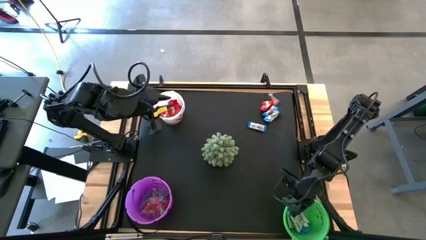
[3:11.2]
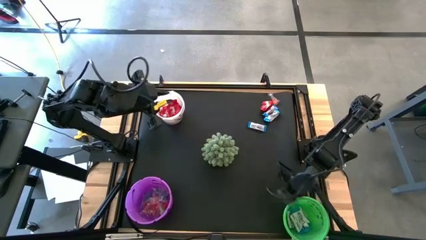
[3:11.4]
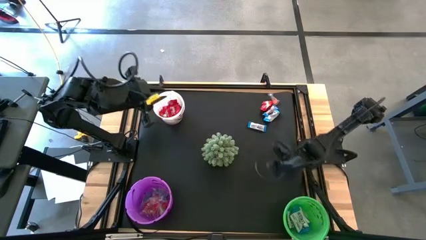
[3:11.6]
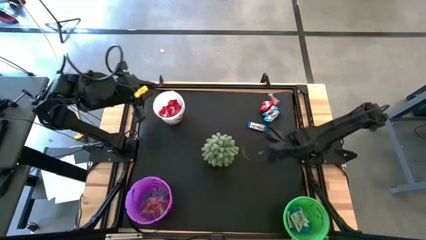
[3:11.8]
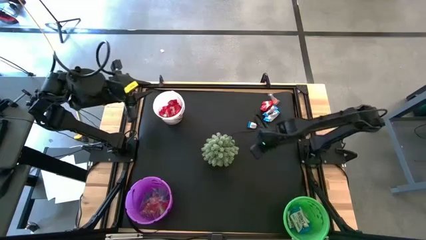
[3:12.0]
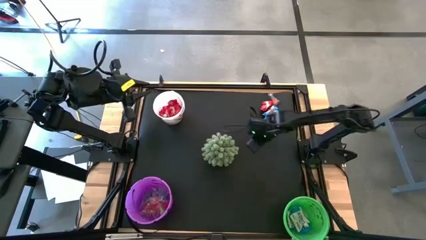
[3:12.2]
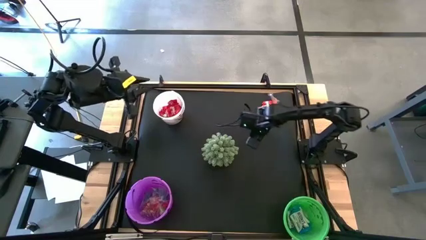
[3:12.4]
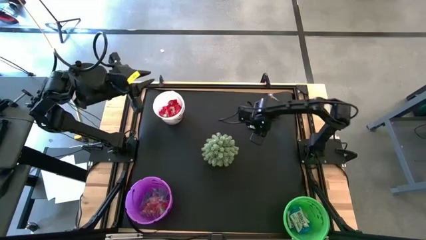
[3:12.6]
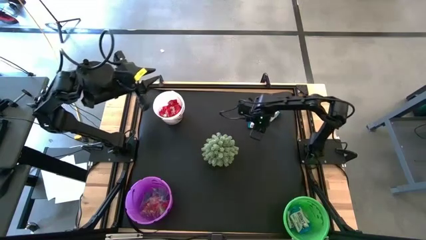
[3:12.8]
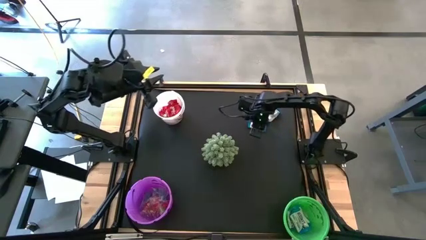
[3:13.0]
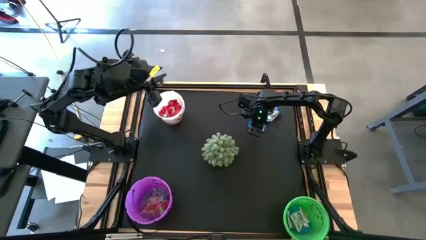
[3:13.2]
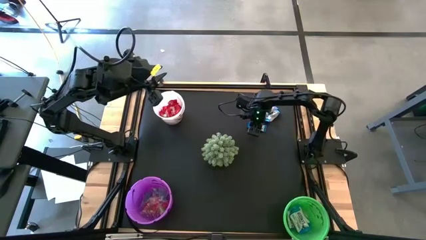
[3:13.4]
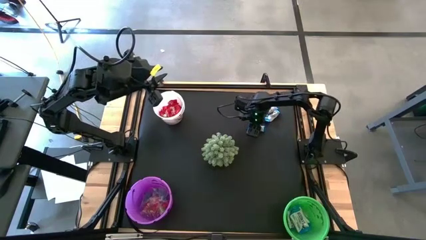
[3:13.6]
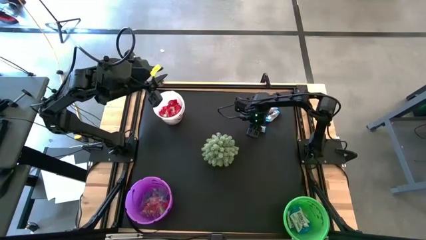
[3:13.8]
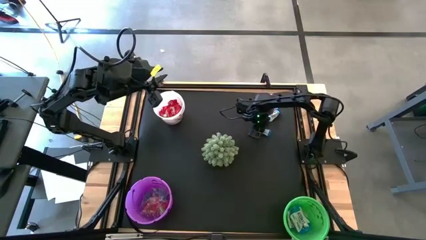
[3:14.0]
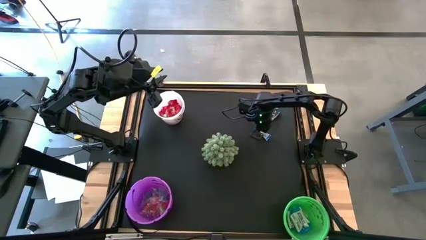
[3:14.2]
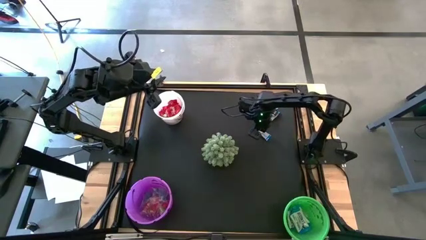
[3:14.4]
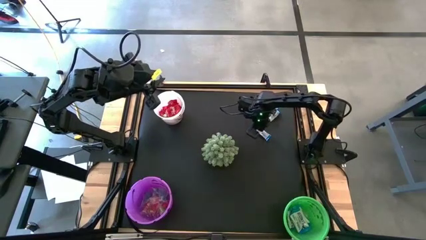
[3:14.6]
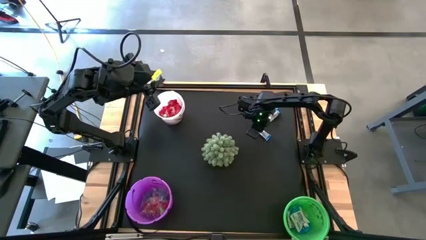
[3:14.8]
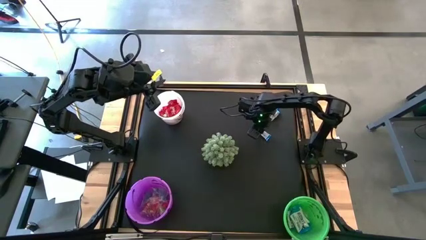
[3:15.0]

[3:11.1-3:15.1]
Task: Organize candy in baskets
Put the white chocolate bar into the green bucket

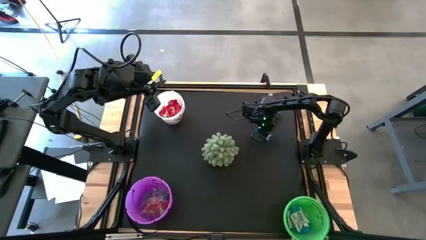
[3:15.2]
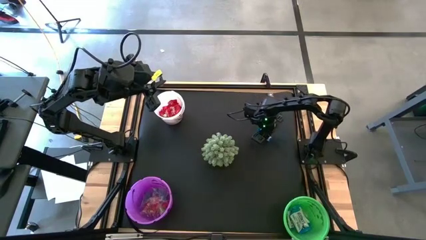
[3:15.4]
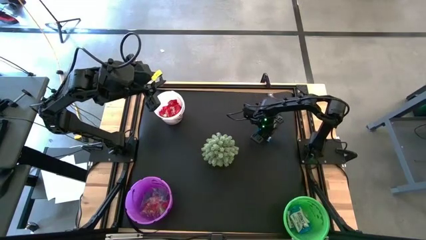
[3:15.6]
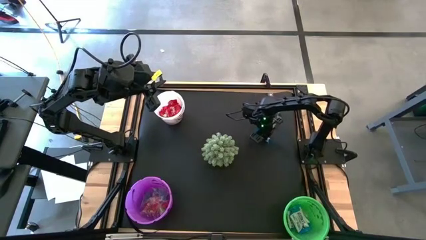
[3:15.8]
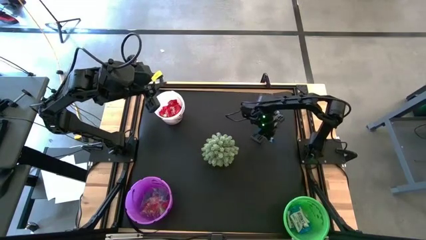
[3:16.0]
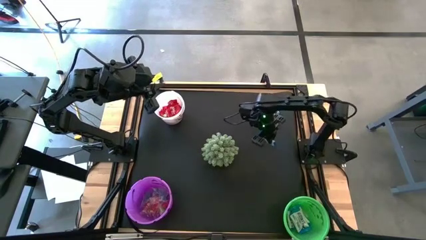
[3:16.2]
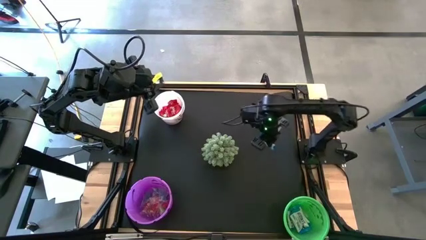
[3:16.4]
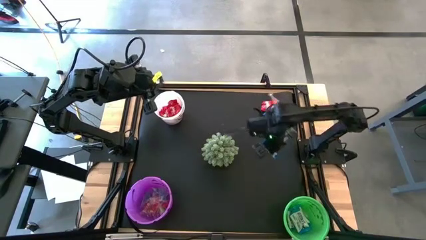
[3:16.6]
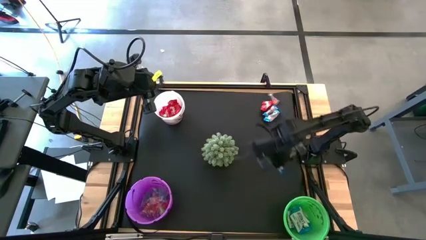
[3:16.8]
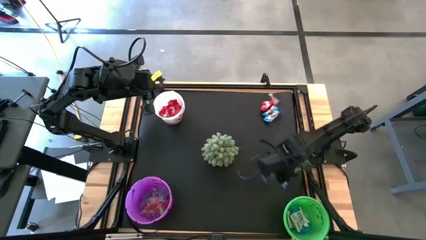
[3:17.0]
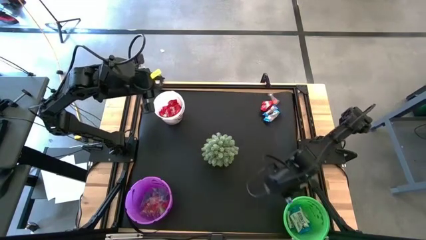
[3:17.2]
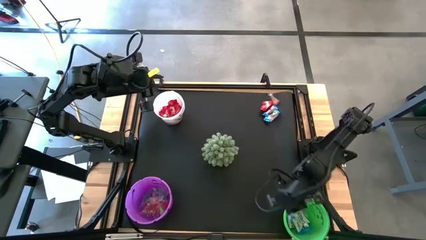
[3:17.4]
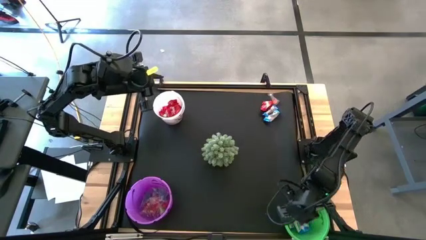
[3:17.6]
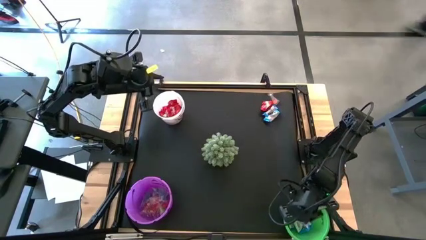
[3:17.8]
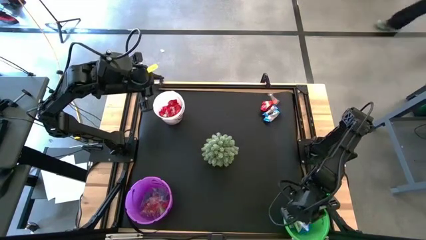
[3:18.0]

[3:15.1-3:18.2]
Put the white chocolate bar into the green bucket

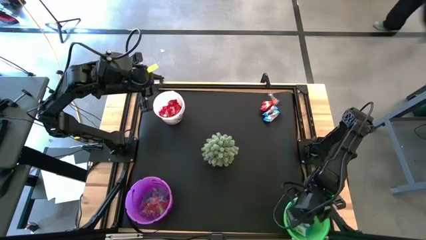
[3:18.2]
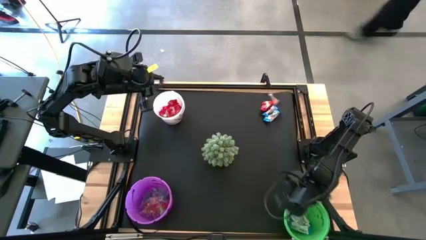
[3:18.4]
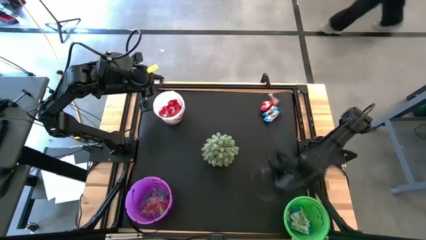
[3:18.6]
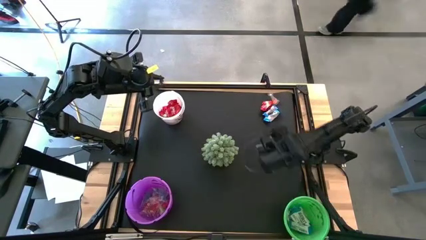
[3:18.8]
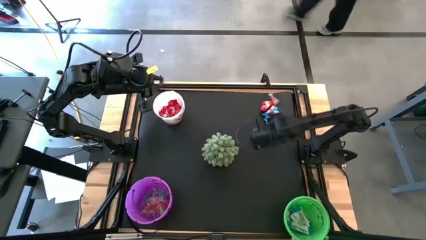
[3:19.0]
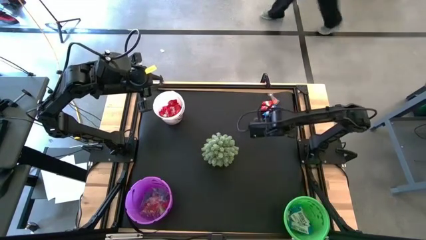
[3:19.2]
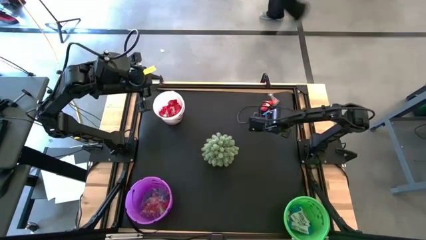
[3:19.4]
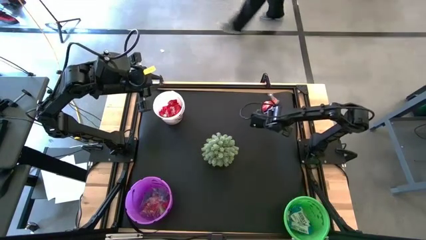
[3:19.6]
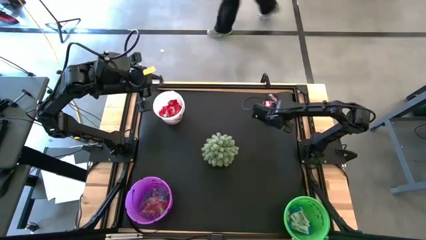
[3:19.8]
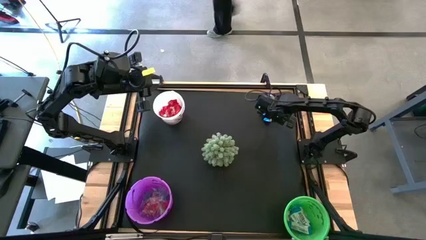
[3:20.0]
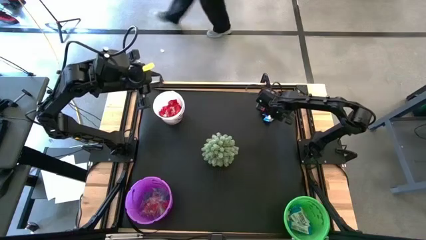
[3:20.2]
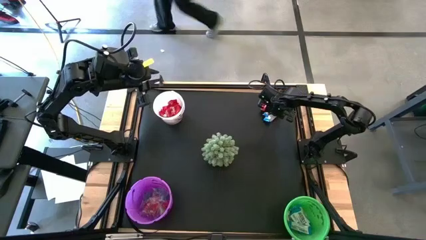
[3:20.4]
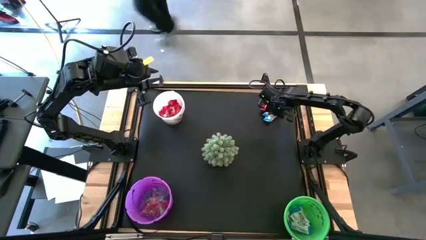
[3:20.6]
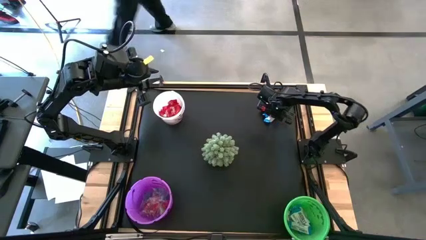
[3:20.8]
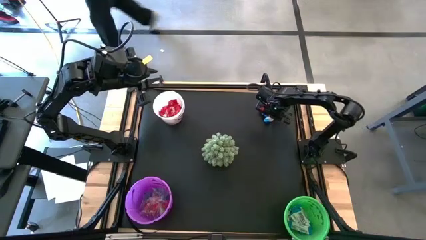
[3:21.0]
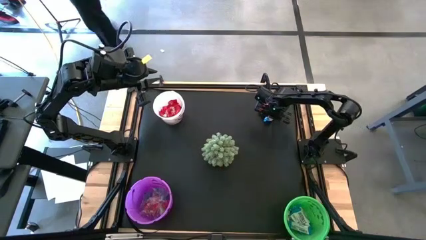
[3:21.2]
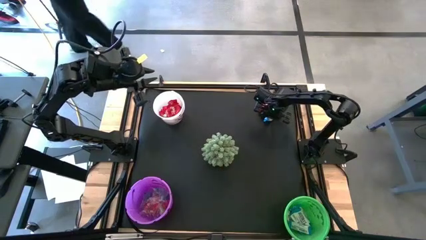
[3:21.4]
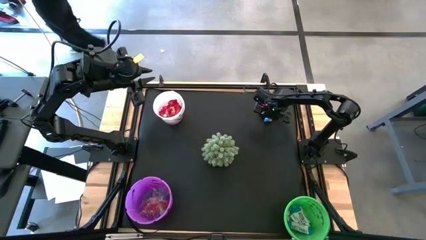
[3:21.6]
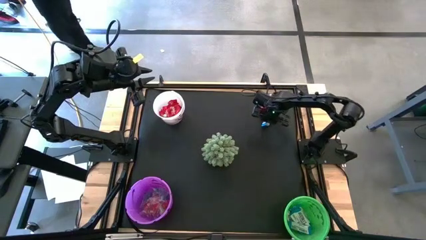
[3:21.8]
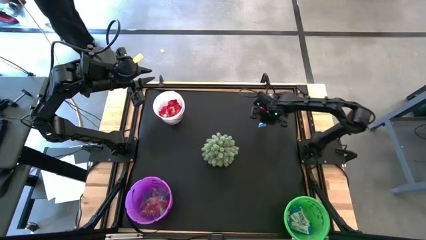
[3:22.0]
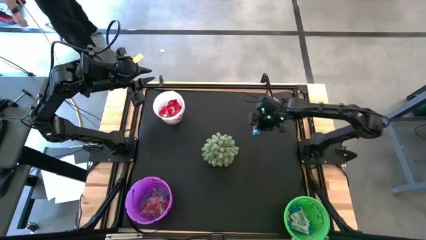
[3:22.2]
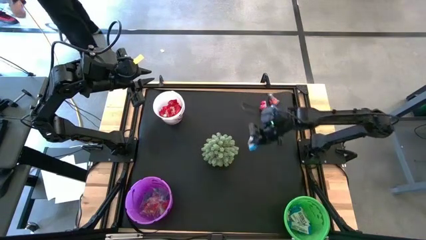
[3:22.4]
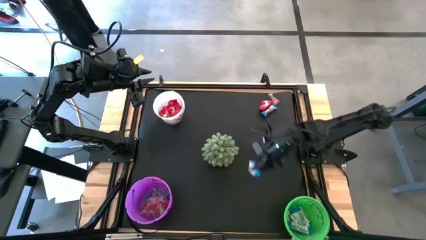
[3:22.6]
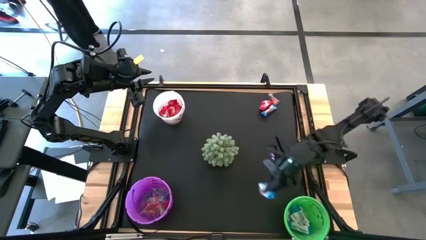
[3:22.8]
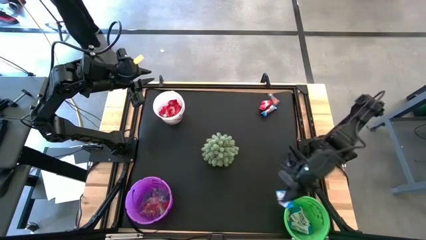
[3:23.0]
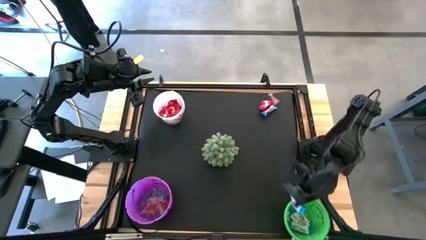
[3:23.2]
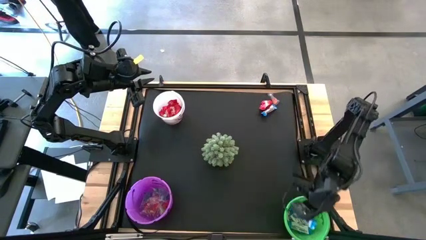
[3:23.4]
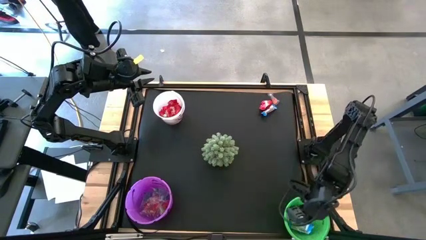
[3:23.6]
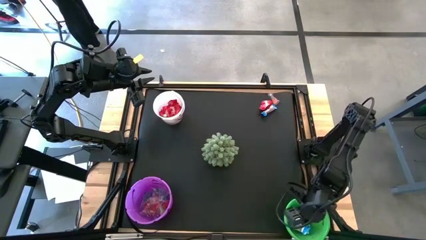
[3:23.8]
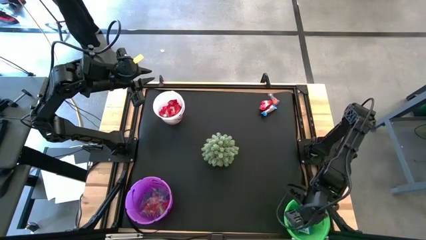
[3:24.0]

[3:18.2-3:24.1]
Put the white chocolate bar into the green bucket

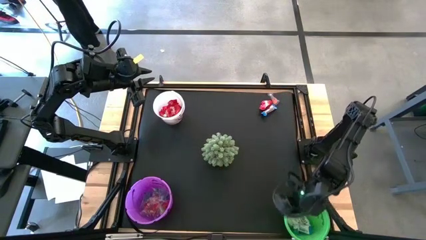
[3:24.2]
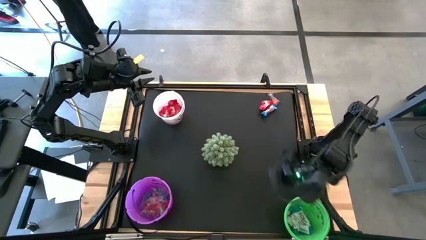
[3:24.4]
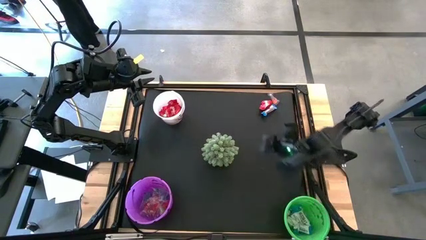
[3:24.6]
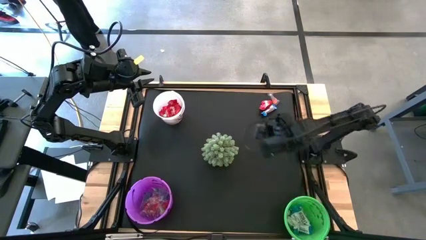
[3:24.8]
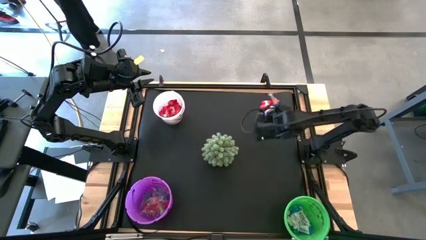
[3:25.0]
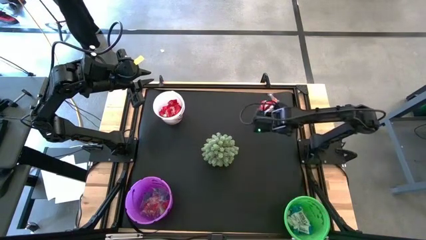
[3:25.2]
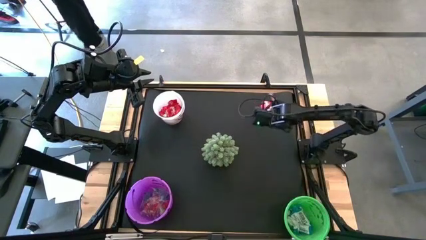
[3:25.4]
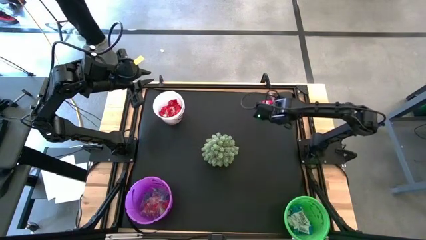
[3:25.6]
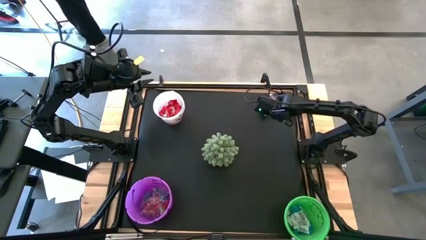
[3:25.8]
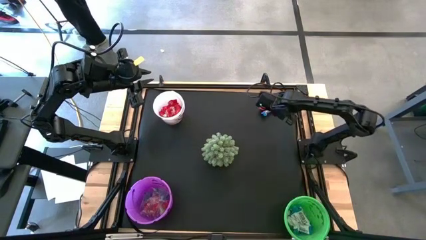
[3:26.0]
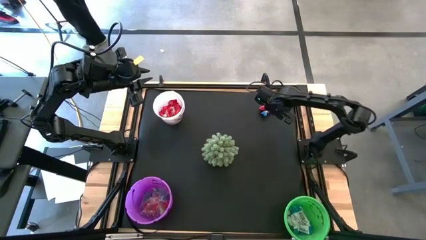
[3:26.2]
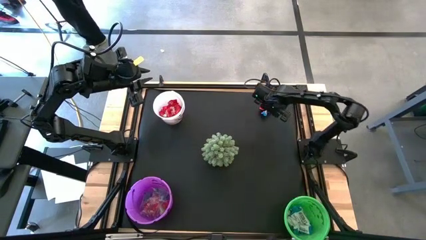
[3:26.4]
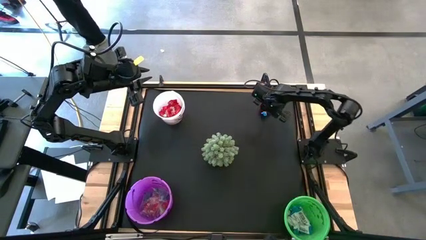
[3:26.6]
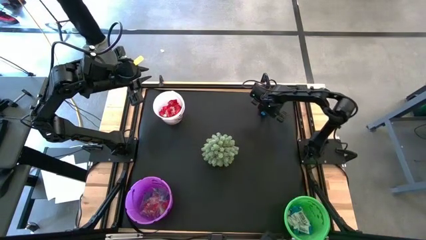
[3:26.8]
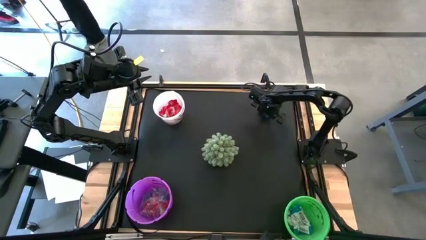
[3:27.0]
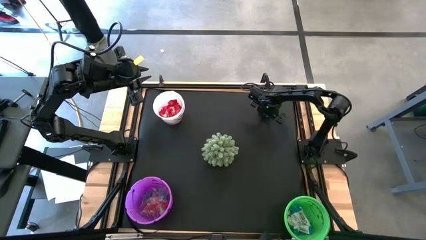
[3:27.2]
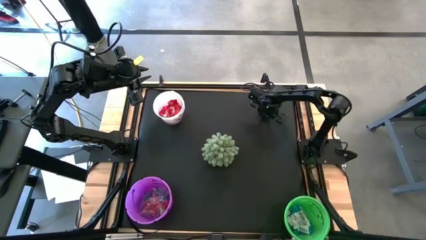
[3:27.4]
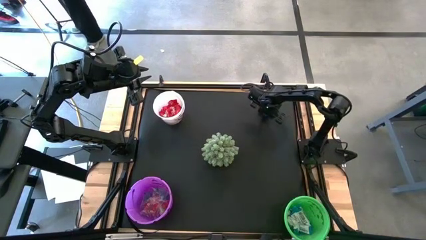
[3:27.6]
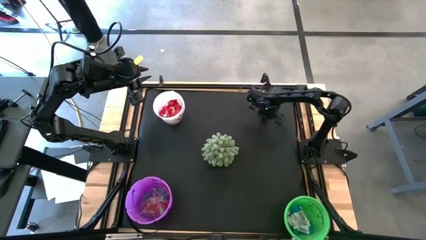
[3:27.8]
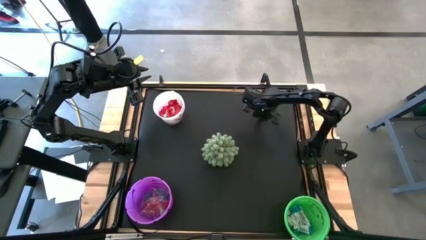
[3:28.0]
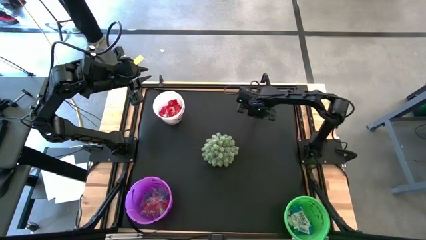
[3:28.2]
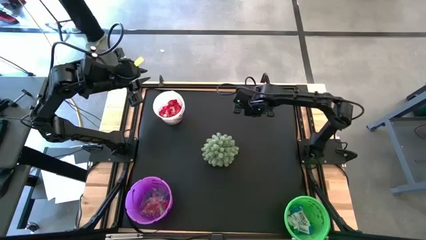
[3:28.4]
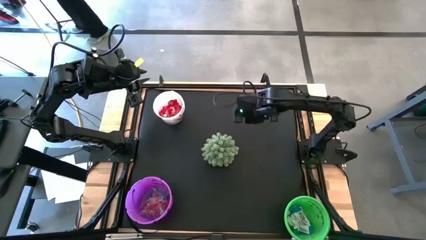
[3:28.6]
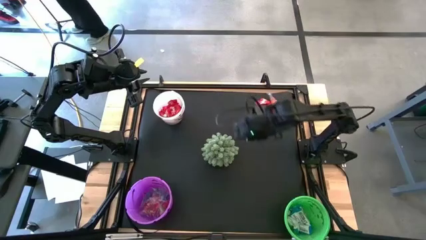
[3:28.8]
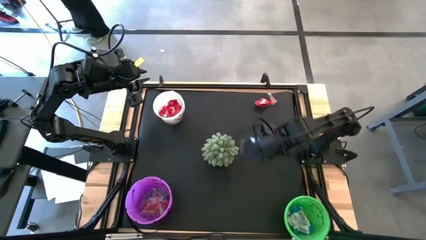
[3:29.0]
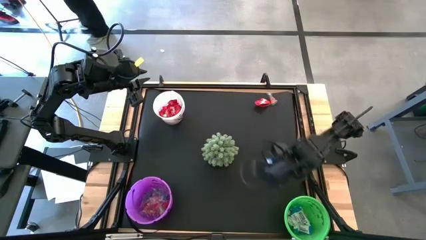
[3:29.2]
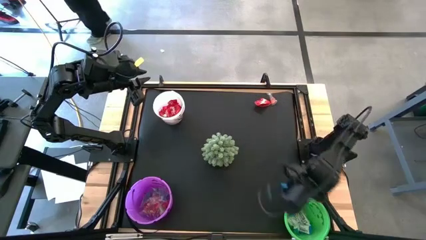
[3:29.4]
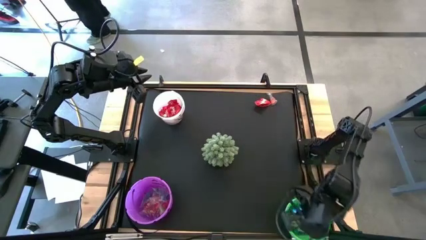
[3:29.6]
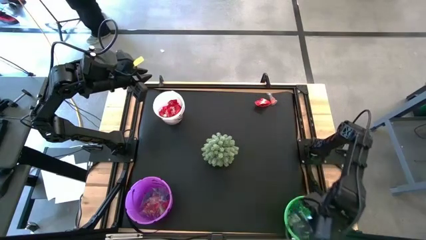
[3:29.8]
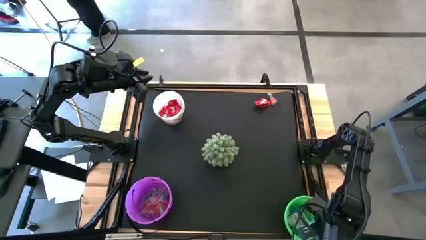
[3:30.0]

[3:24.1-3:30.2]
Put the white chocolate bar into the green bucket
